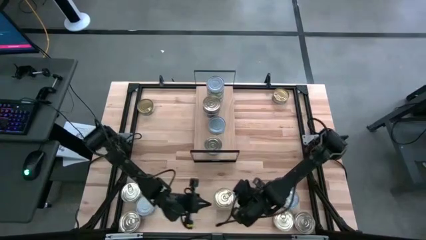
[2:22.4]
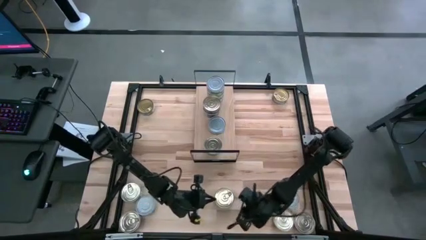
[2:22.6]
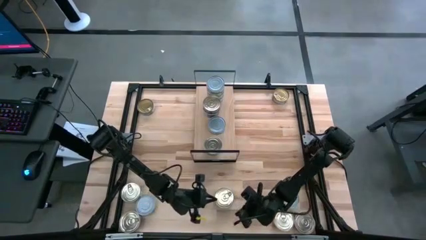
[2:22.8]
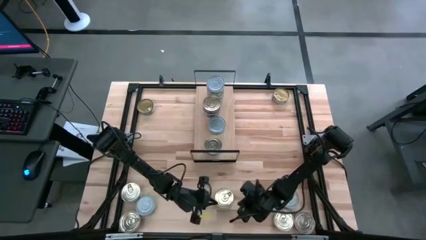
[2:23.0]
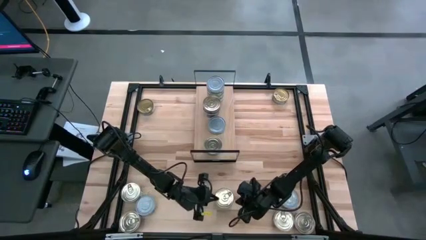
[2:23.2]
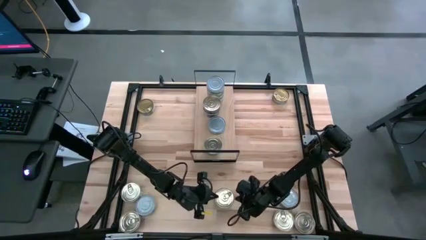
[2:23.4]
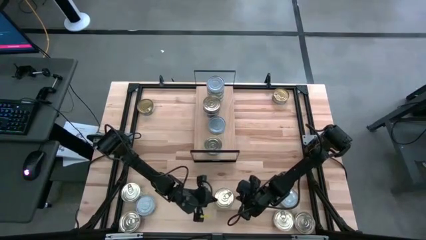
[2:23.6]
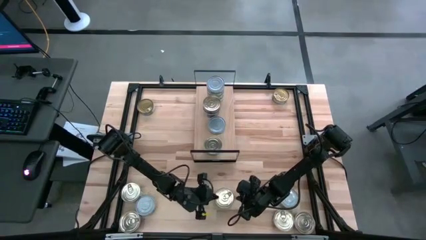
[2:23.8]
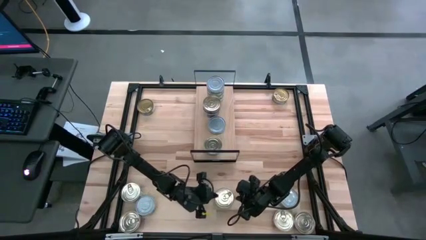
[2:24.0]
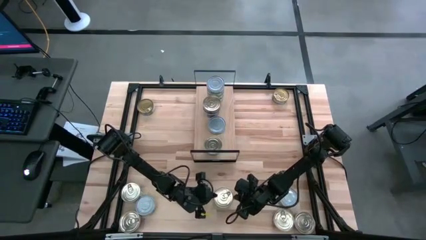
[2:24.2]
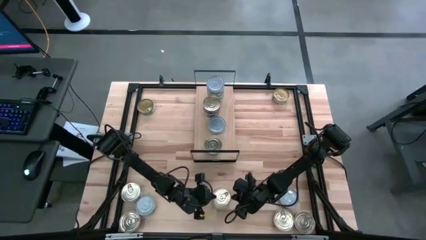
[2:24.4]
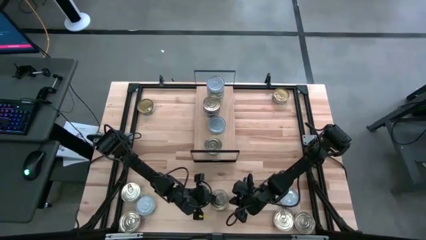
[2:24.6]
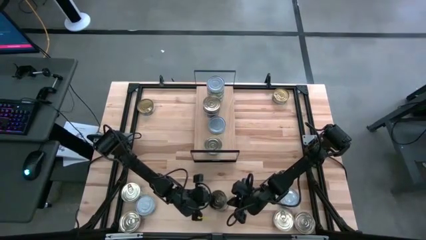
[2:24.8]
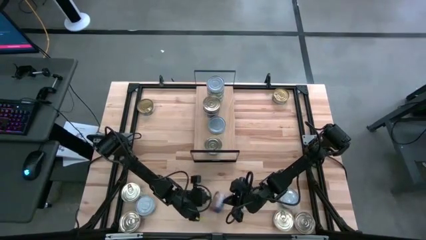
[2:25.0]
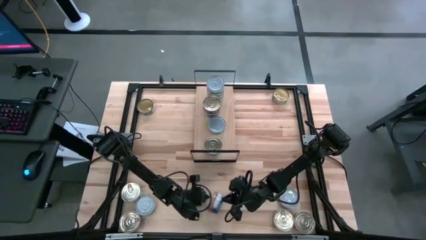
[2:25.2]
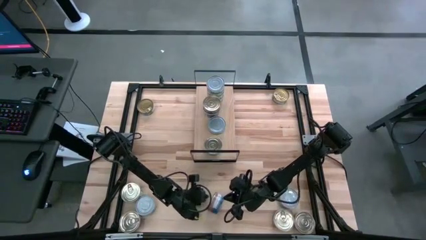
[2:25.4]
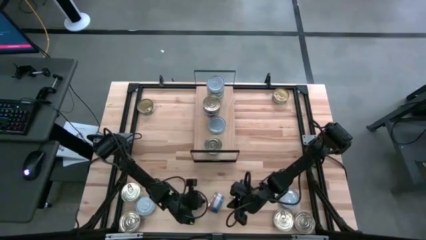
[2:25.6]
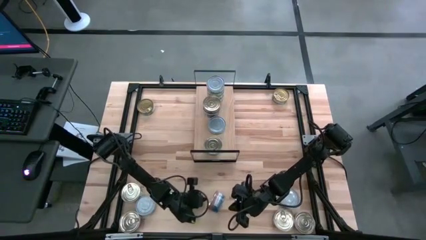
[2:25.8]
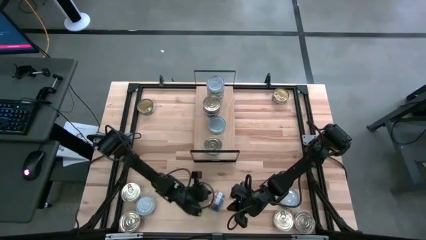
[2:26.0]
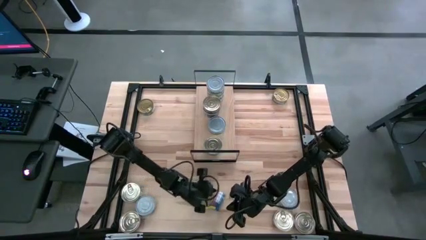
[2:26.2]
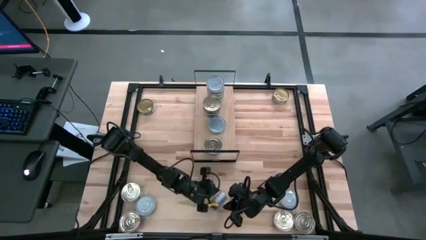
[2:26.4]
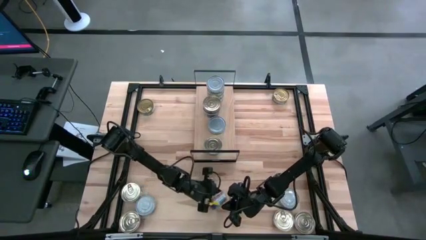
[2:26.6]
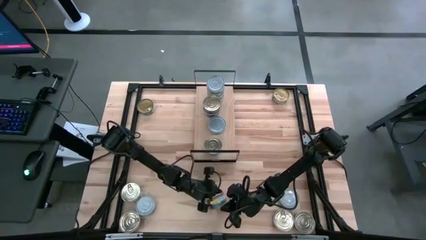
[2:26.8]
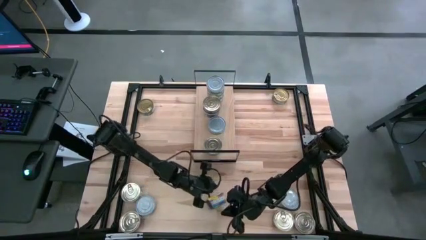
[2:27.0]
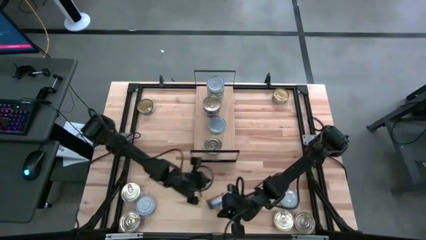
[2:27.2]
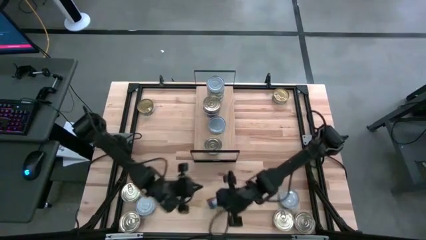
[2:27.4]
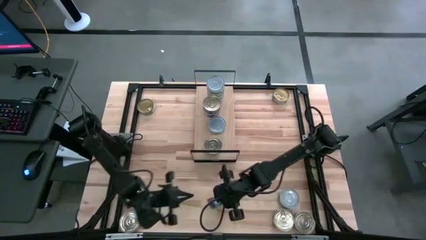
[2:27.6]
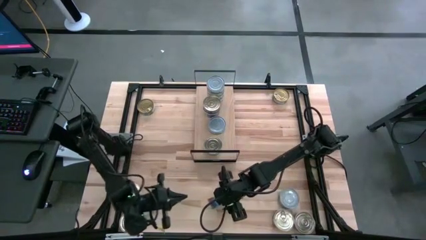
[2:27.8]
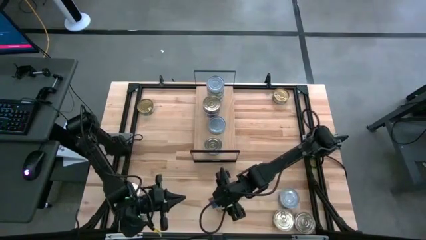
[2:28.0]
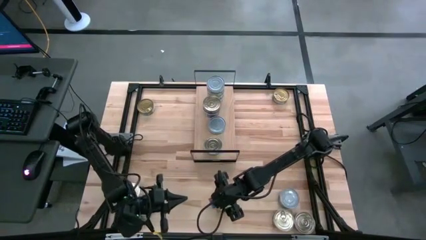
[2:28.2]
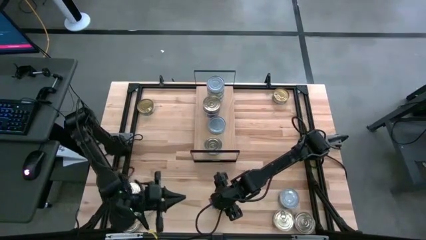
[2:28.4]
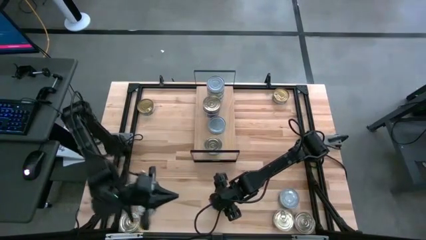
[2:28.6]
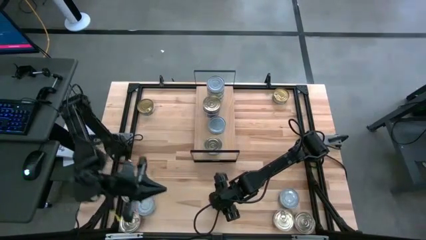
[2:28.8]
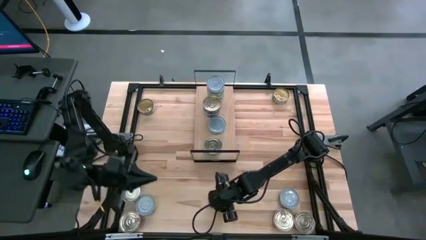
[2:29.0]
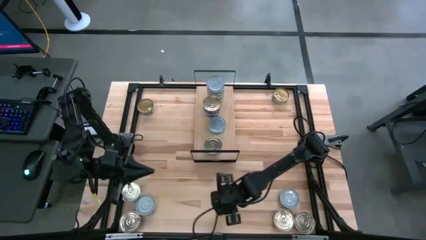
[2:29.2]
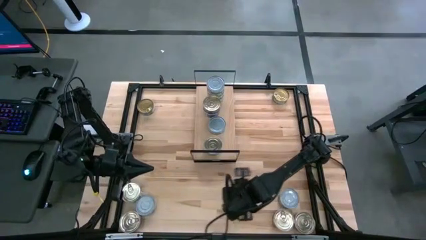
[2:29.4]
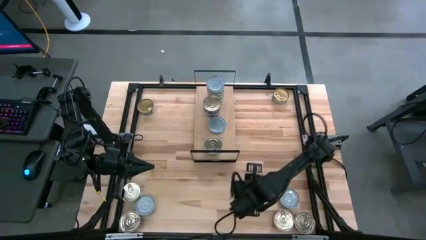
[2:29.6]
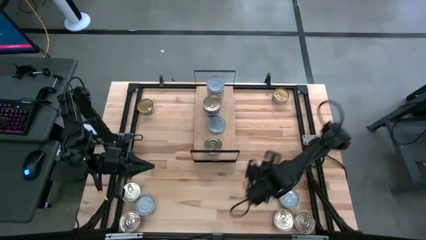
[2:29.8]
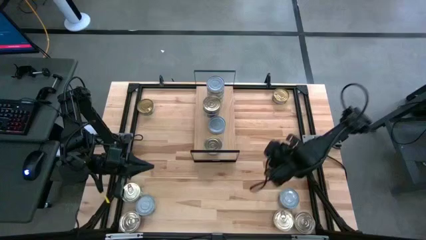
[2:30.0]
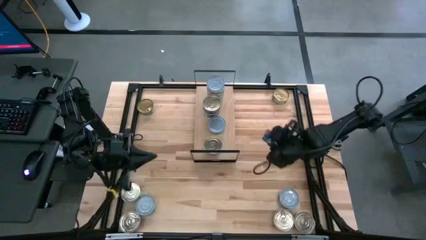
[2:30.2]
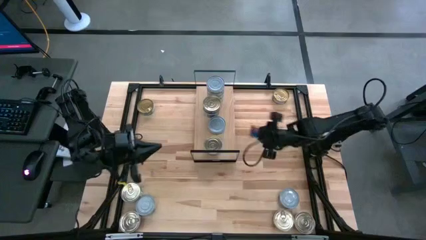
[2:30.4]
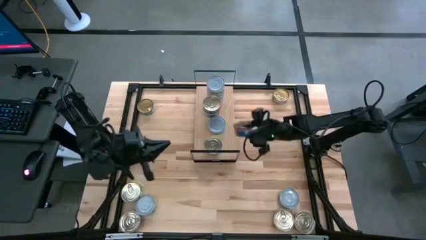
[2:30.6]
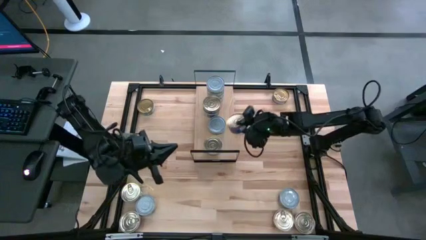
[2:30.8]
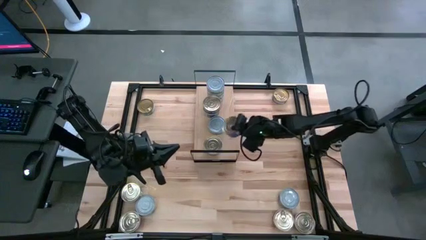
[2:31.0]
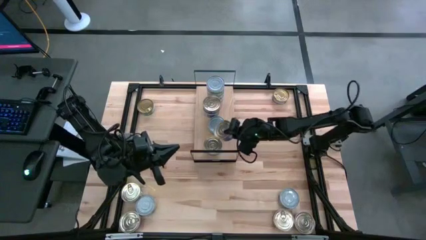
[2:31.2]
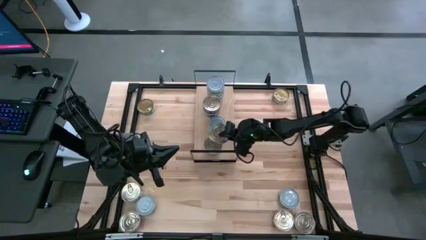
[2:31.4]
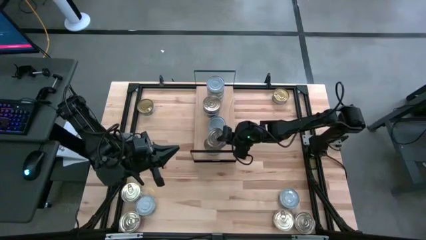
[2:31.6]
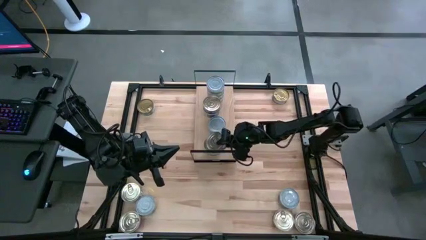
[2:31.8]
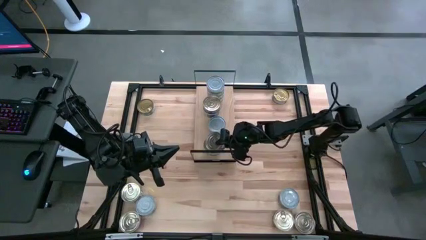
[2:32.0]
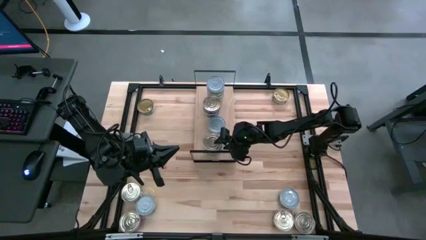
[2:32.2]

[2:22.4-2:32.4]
Task: Stack canned seafood by type on shelf
Stack the pink and blue tuna cans on top of the pink and blue tuna can

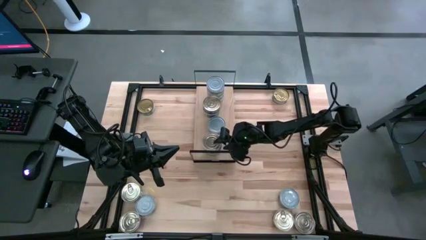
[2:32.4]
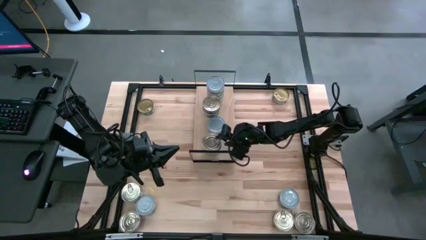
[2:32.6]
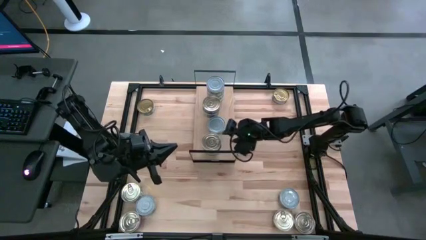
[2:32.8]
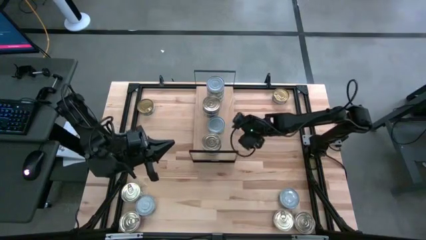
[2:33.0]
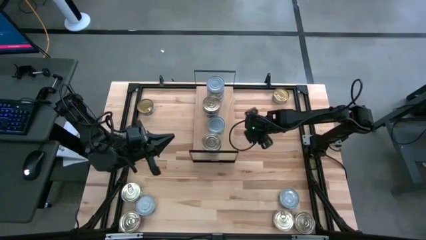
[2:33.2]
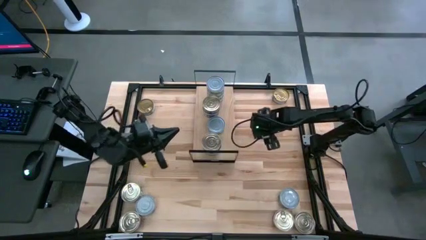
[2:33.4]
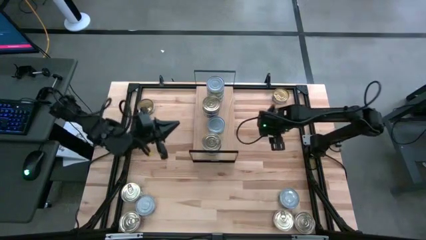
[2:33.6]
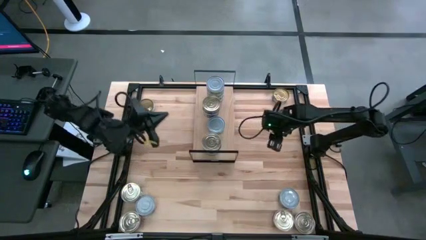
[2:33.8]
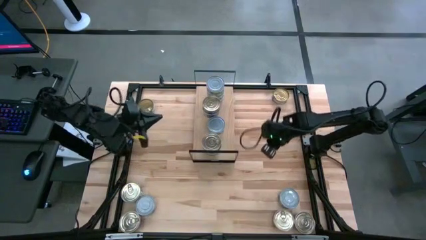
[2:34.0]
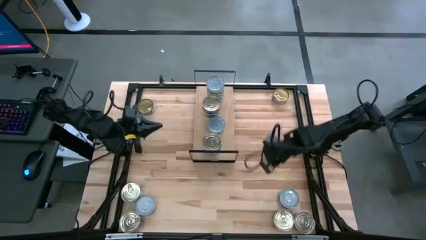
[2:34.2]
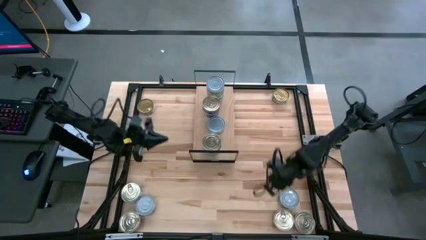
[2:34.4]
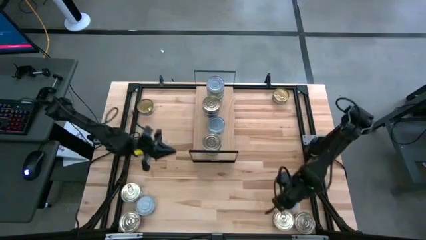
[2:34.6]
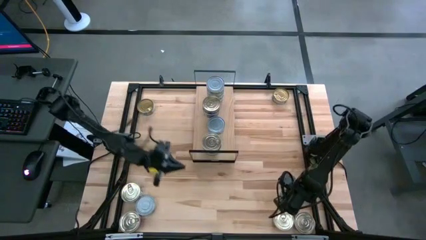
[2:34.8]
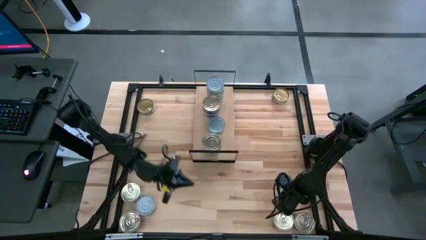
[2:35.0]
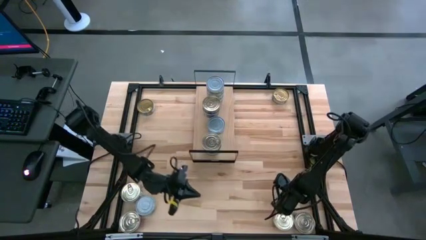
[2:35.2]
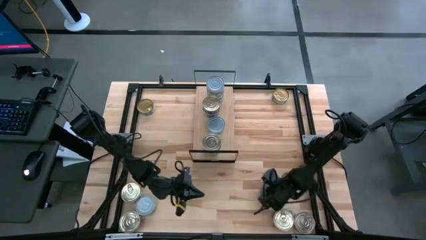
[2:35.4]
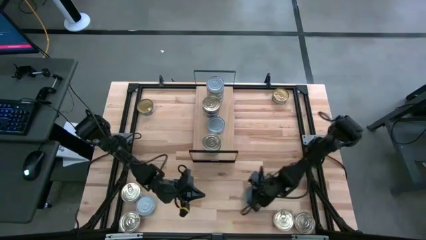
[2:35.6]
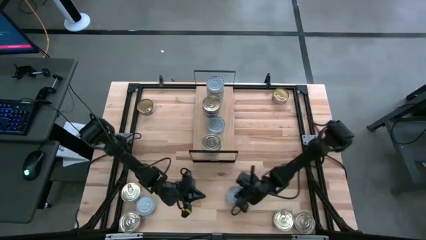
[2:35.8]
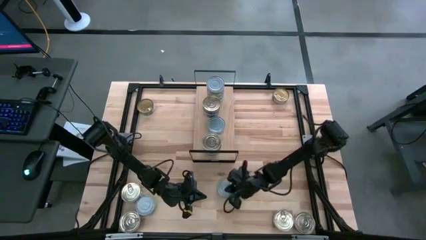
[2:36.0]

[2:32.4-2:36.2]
Move the green tuna can to the bottom middle of the table

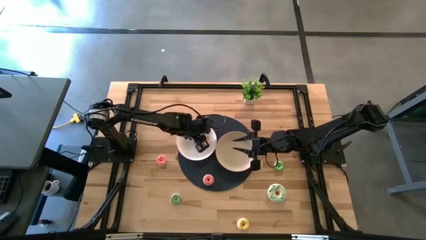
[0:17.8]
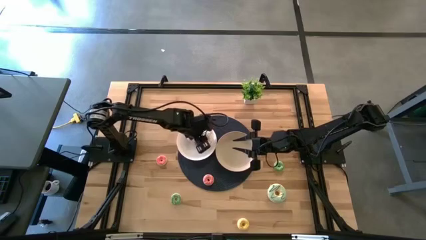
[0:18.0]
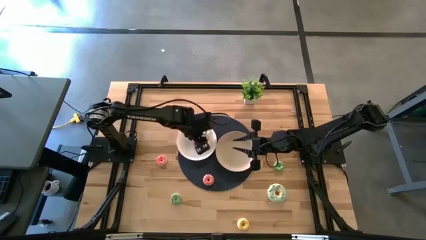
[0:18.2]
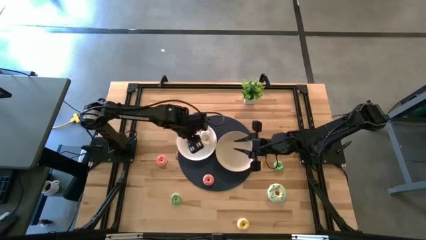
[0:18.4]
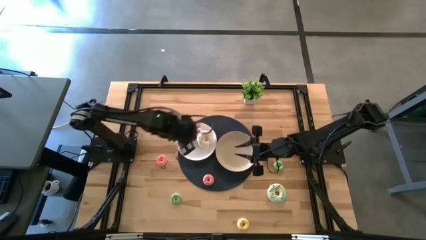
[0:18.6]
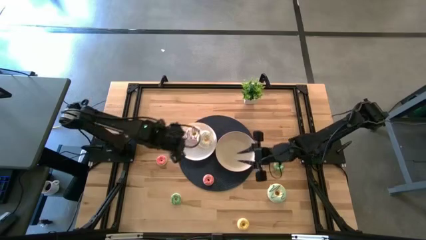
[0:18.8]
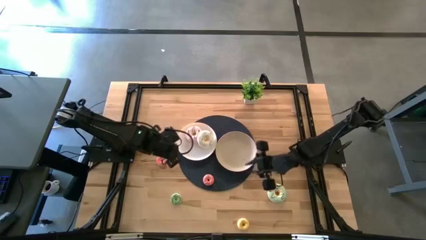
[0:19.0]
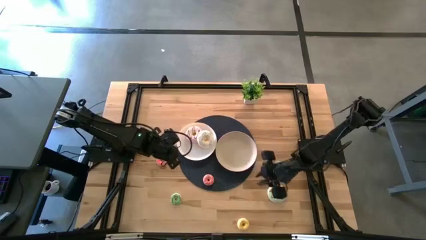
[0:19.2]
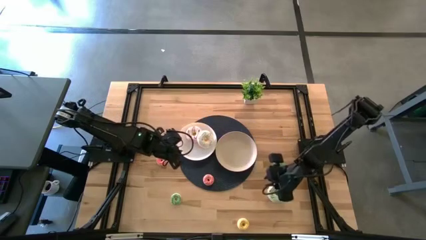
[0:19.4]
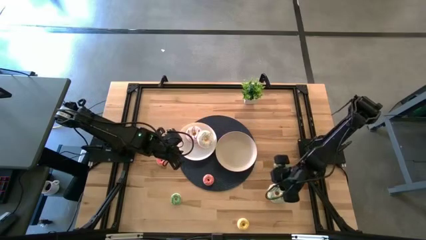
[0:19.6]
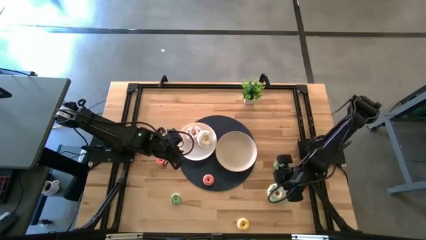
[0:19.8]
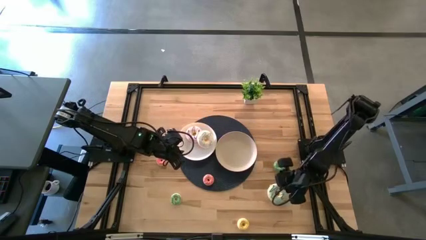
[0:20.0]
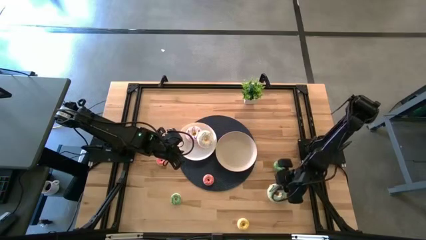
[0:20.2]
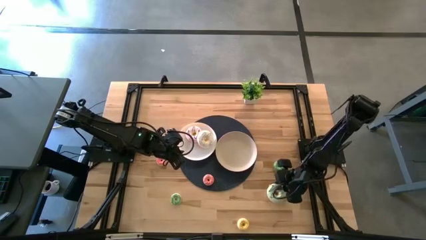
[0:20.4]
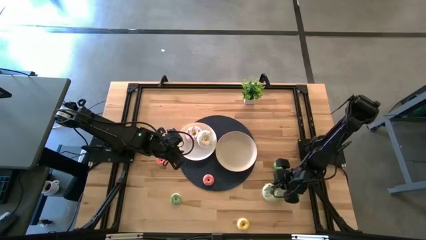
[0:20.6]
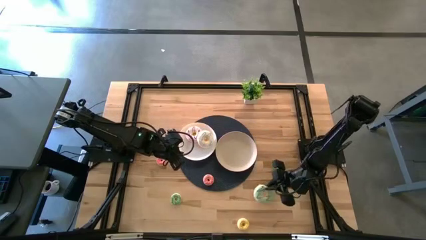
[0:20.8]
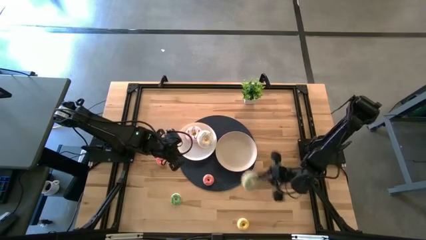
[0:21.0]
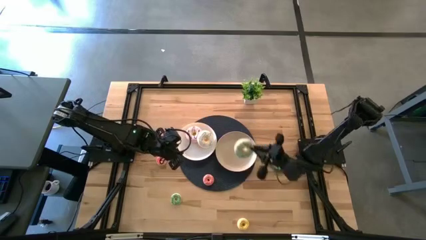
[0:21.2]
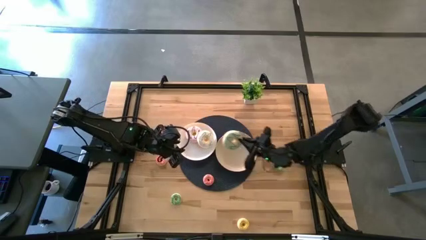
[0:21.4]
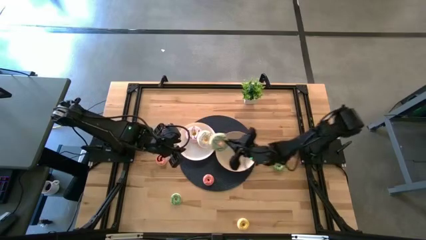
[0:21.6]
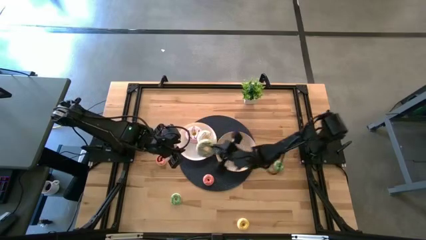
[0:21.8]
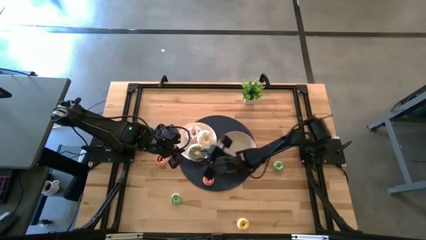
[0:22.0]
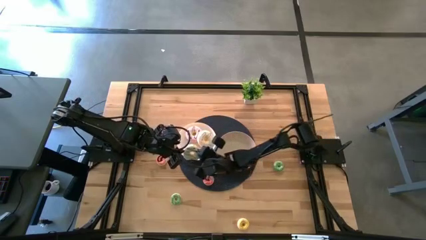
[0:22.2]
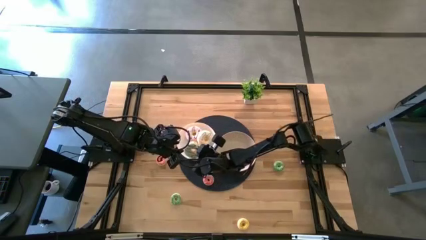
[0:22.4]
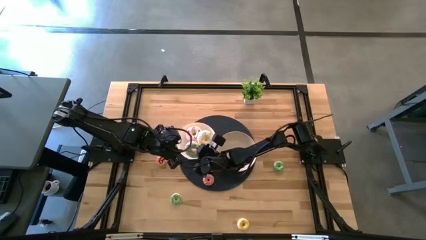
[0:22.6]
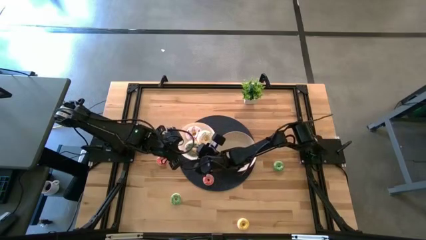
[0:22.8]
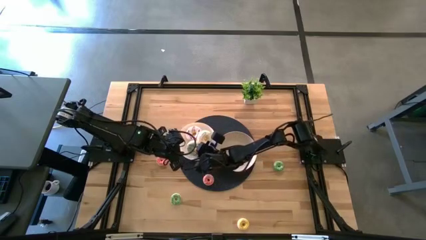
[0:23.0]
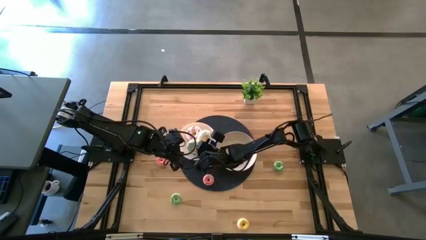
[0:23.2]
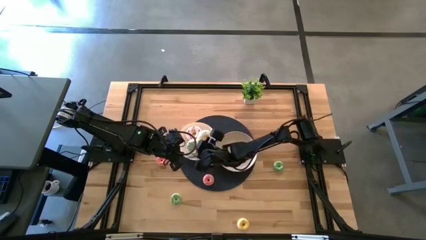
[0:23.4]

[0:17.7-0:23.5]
Task: Pick & Place donuts
Put the large light green donut on the white plate
